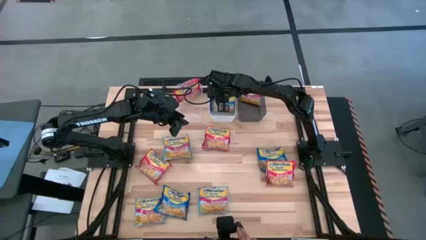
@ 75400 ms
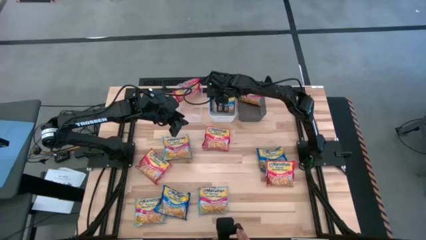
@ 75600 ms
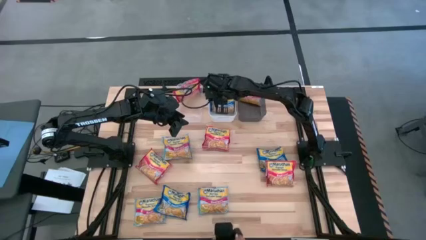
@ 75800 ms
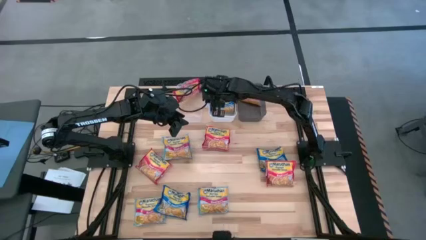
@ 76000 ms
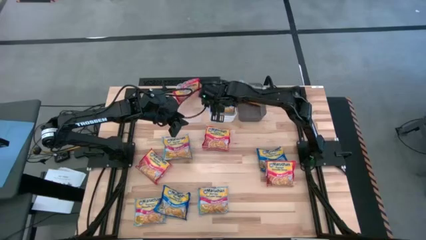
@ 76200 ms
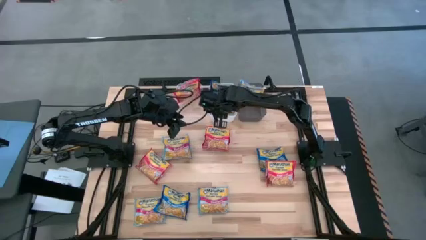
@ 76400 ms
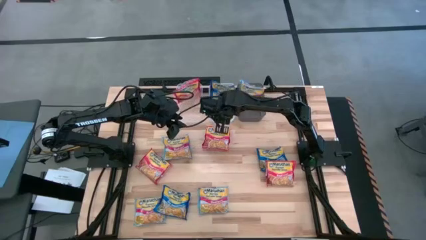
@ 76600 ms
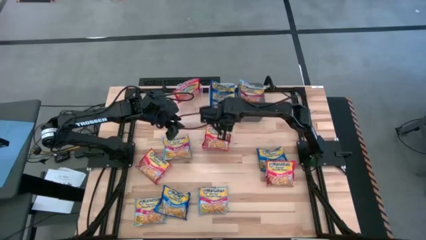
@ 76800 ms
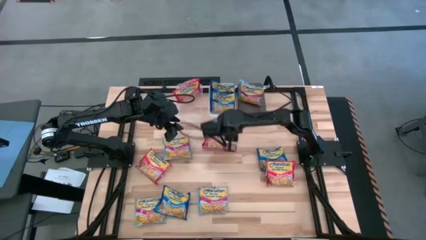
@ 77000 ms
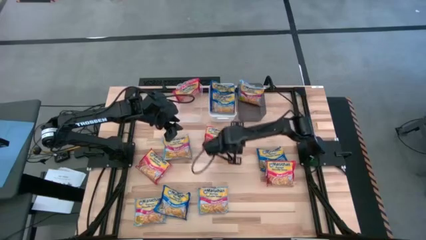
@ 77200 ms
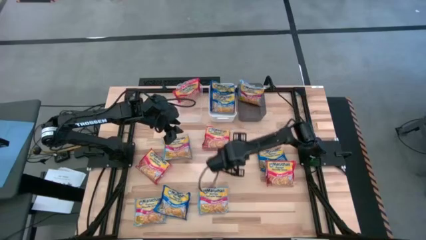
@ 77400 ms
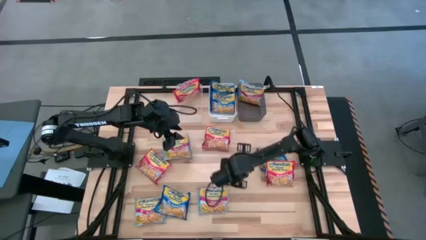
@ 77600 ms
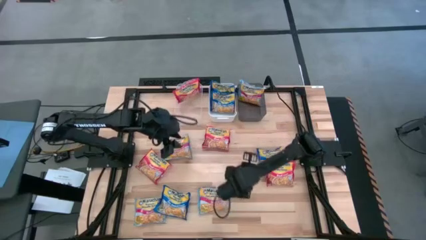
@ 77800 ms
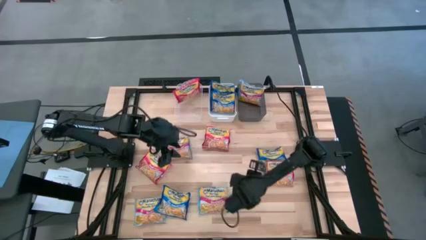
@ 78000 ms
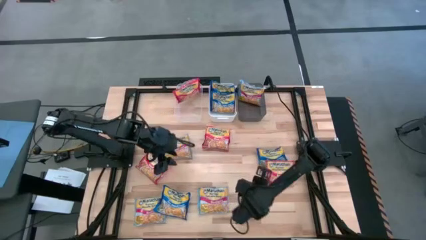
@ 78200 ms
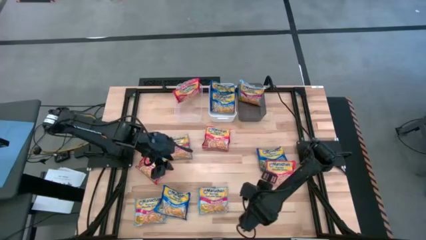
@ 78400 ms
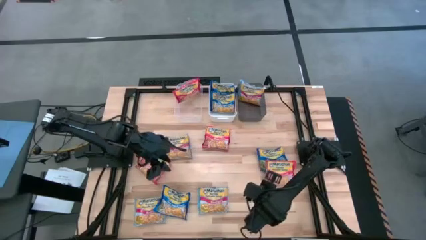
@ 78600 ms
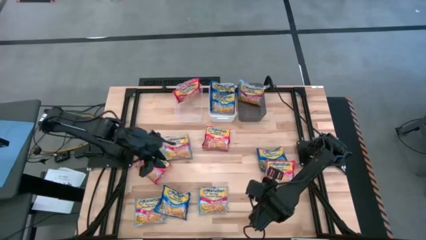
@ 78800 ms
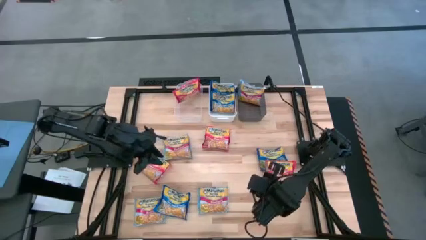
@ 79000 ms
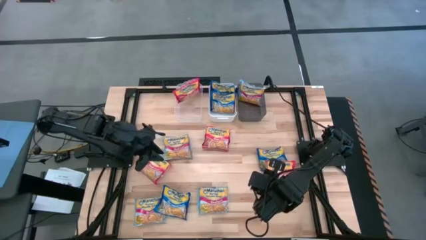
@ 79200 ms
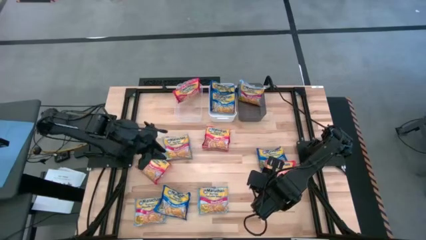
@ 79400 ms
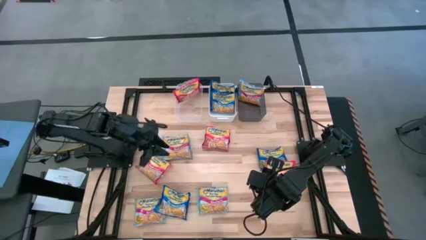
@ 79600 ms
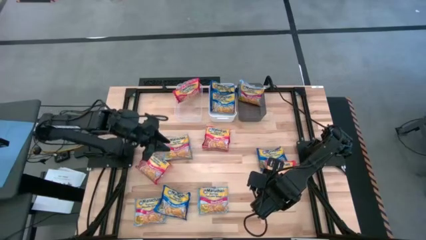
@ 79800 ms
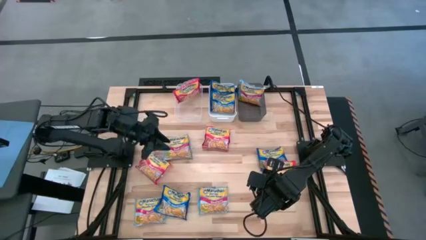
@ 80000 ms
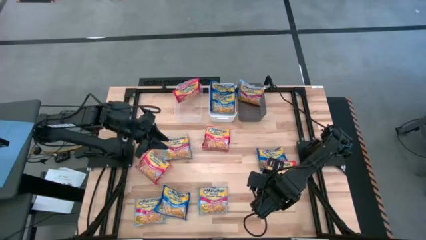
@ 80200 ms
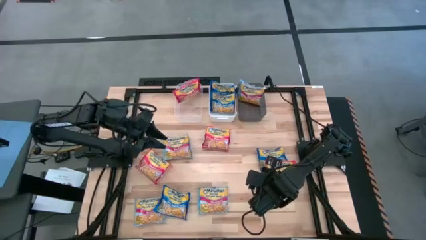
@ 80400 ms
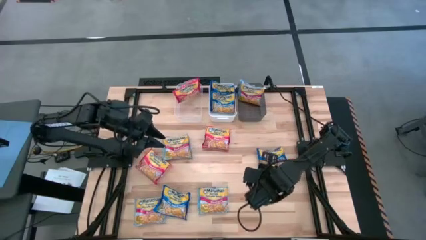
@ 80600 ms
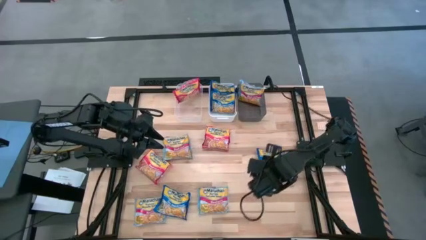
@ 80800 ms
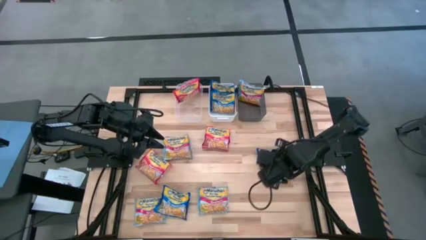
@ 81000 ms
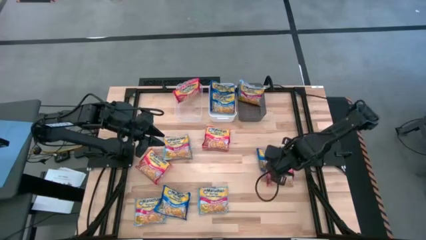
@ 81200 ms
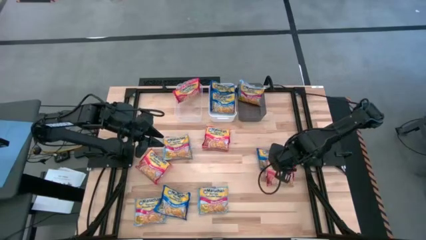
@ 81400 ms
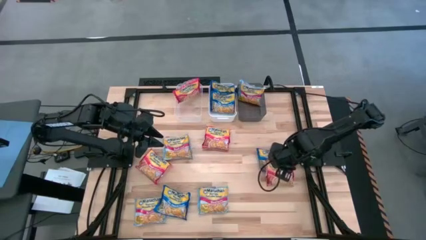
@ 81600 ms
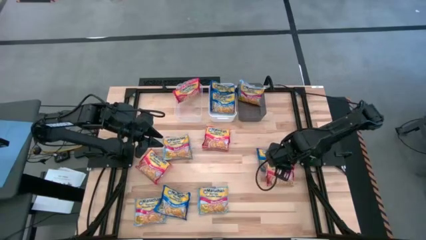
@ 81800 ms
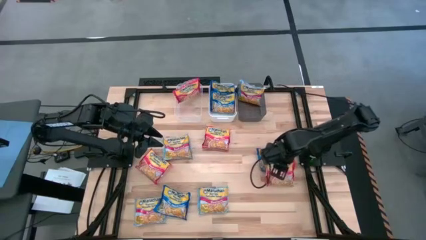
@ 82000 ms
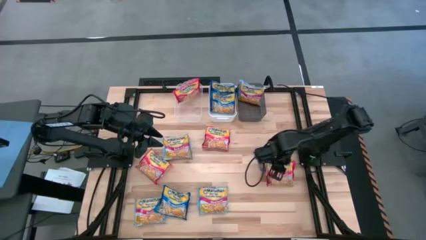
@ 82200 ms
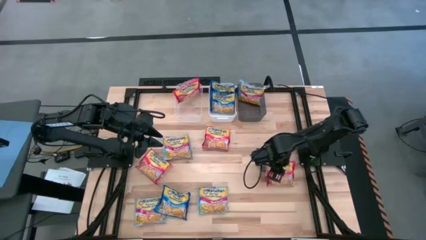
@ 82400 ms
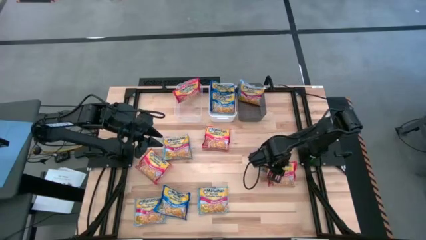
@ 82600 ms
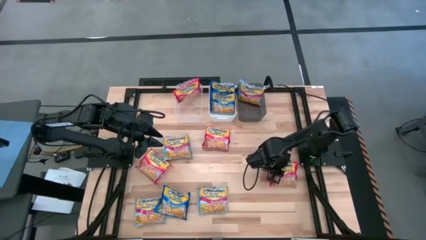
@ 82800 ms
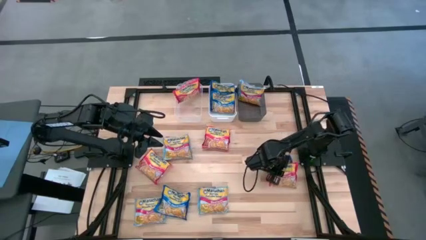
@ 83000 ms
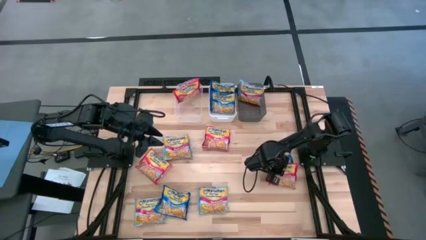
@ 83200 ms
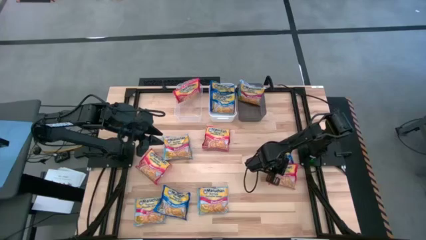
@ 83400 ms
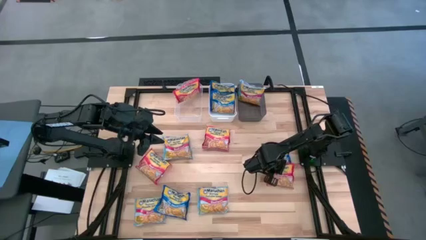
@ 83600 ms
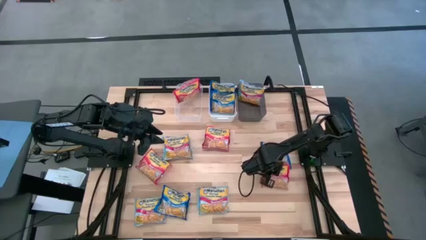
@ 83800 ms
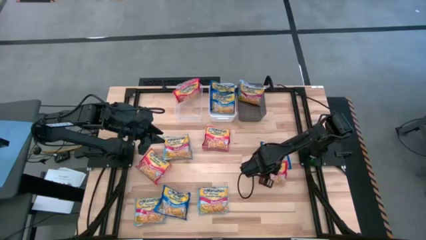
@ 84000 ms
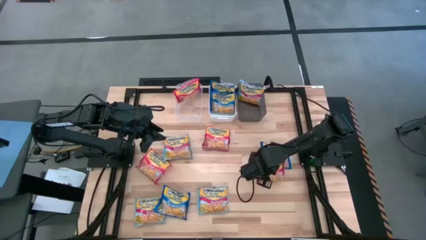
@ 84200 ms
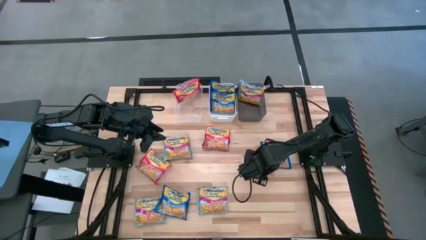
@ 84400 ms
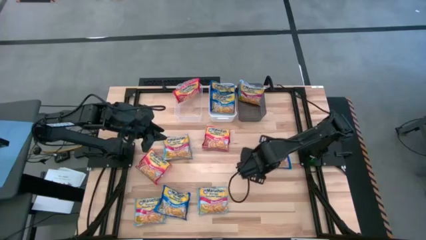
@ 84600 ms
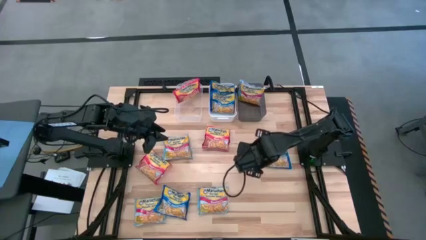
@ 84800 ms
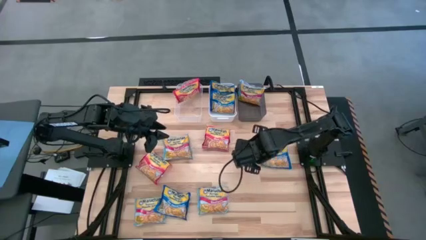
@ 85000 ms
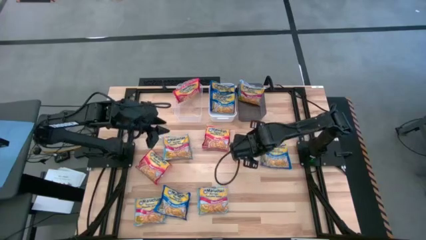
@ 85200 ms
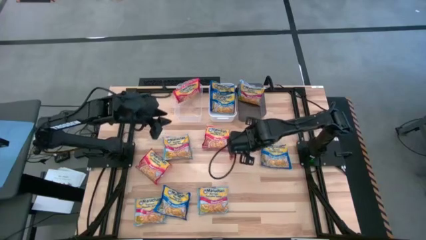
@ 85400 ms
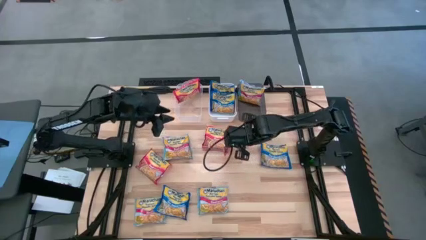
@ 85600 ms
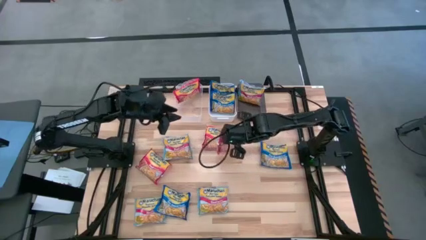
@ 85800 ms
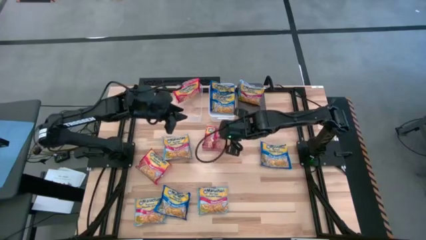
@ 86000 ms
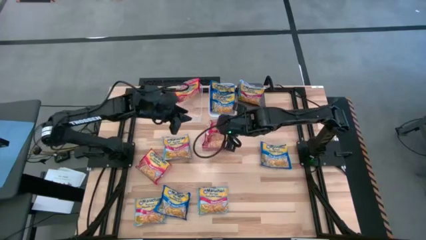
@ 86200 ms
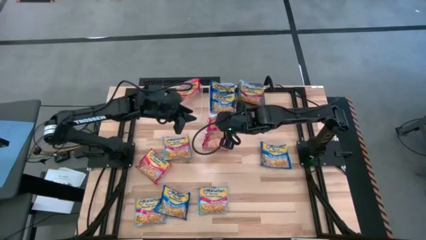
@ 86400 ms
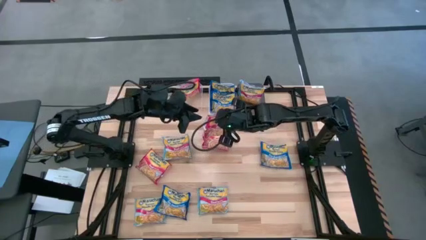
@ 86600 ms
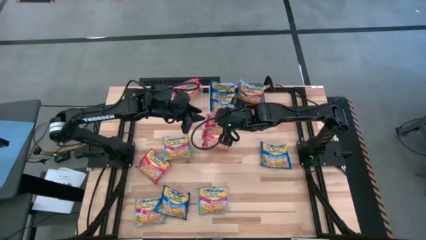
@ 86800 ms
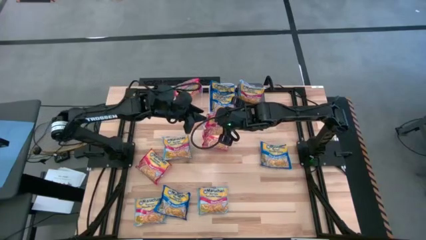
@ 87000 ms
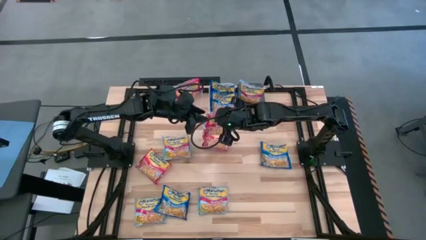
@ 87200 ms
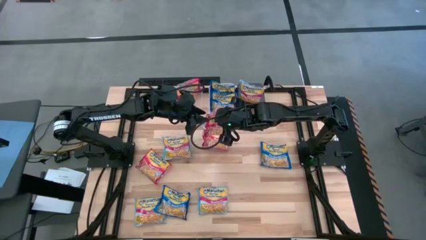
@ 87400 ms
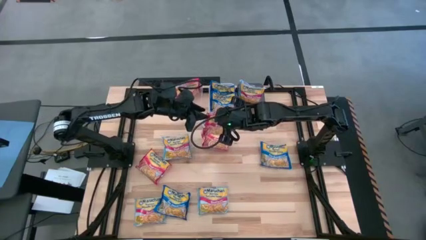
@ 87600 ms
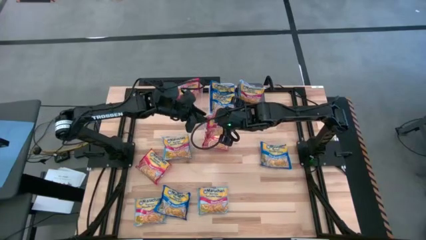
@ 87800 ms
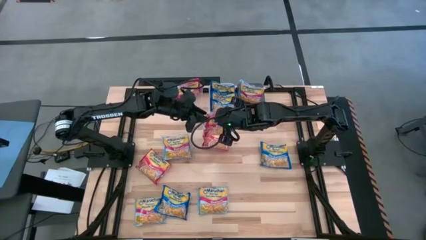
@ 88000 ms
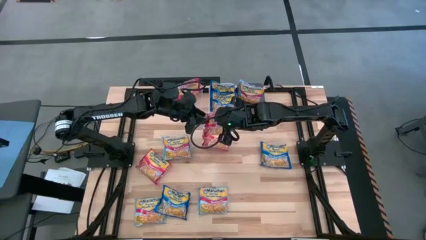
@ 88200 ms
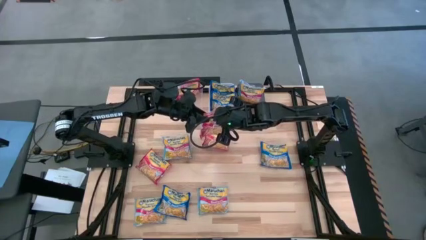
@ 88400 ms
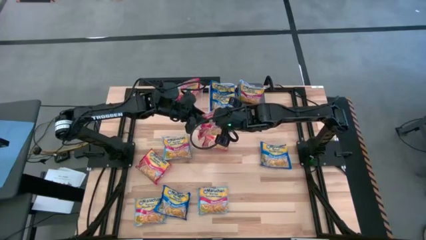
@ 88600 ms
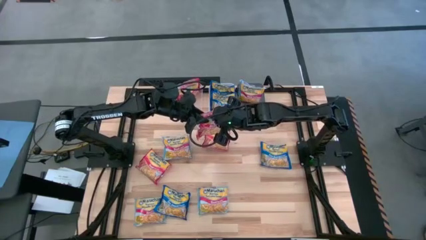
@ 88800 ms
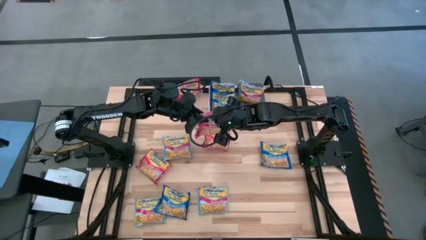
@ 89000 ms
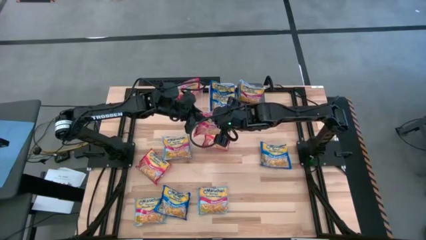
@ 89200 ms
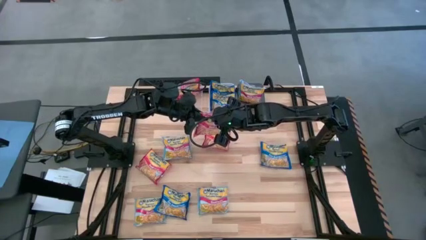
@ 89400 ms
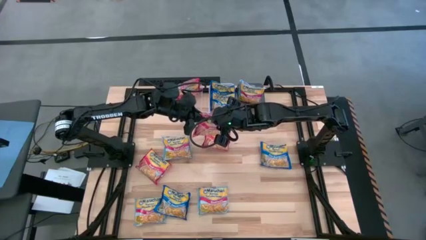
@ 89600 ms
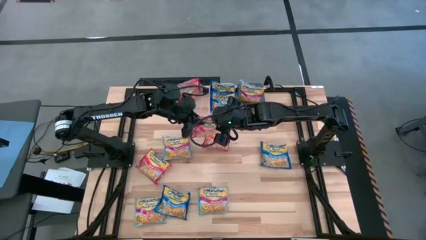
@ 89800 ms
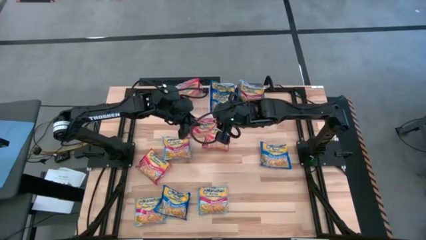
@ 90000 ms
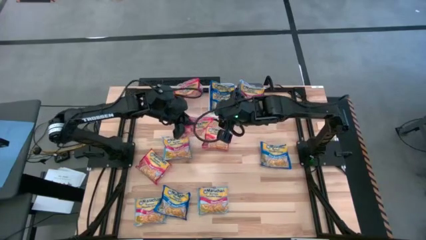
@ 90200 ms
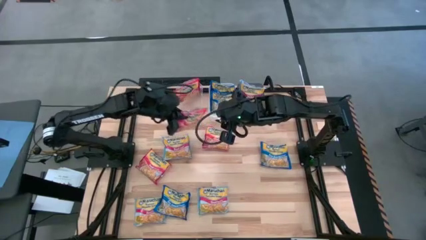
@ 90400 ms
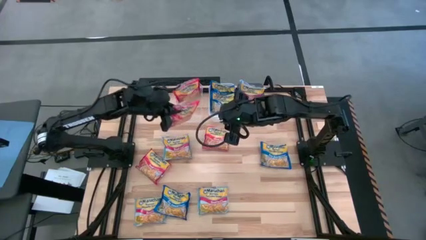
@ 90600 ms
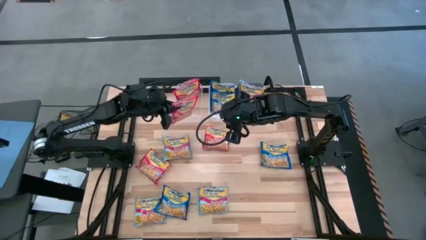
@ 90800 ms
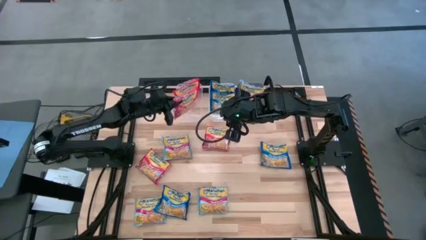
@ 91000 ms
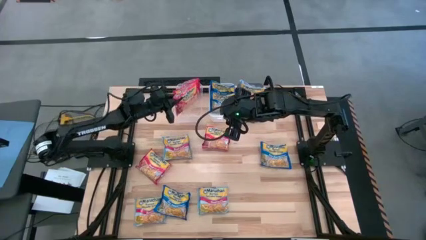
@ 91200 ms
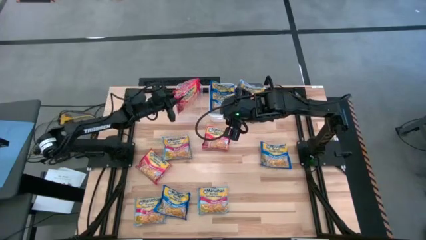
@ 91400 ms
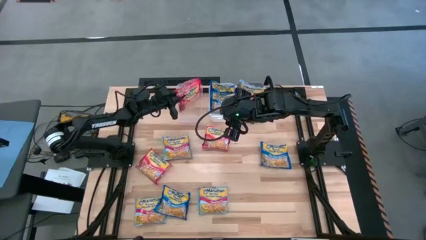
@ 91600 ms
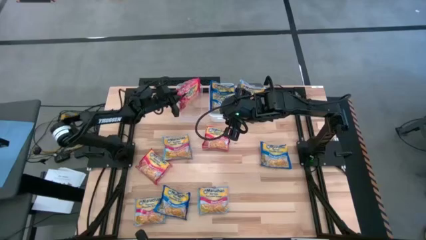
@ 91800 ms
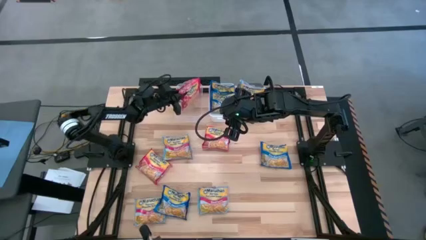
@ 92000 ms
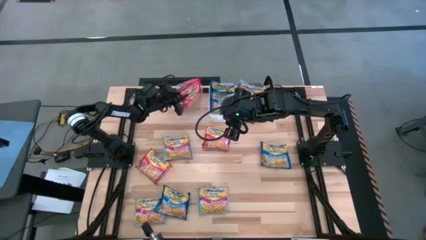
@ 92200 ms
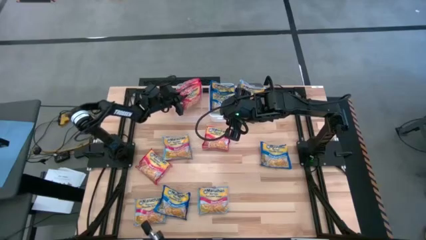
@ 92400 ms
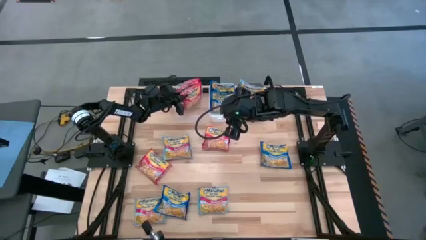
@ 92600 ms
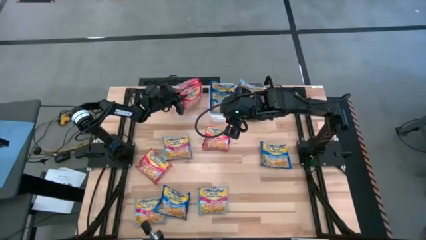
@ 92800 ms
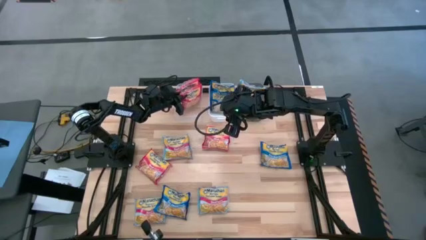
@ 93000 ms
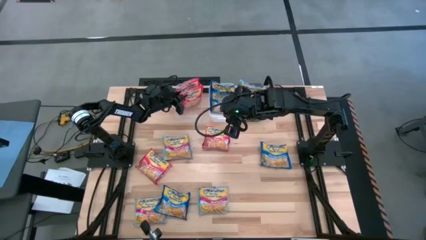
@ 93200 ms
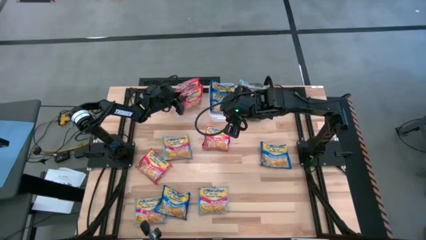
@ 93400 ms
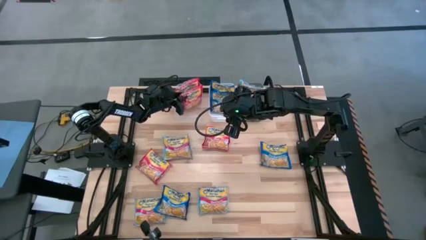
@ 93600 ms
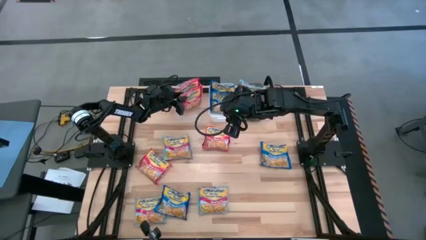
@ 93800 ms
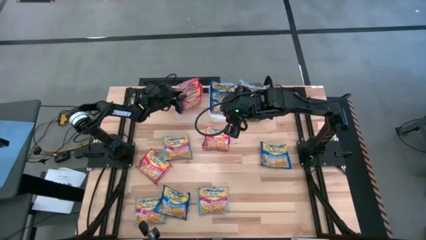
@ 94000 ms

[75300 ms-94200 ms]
Task: Sort Maruchan noodles
Put the red noodle pack into the transparent bin
